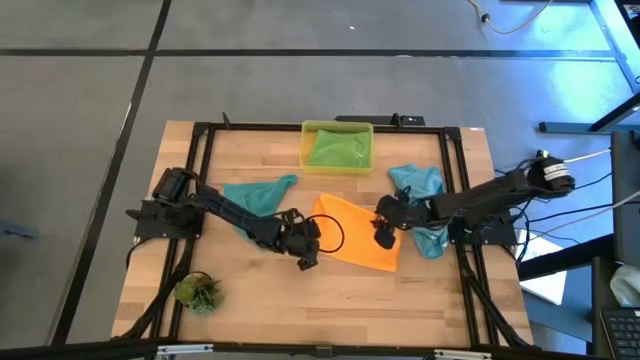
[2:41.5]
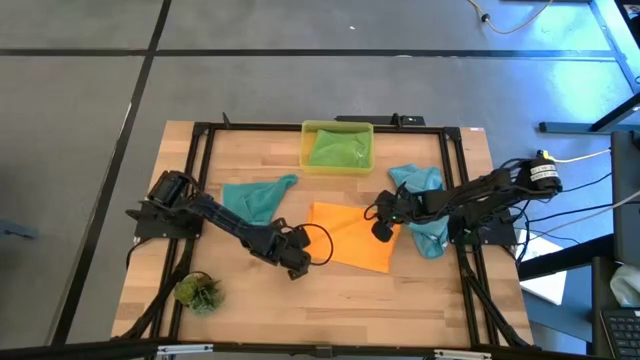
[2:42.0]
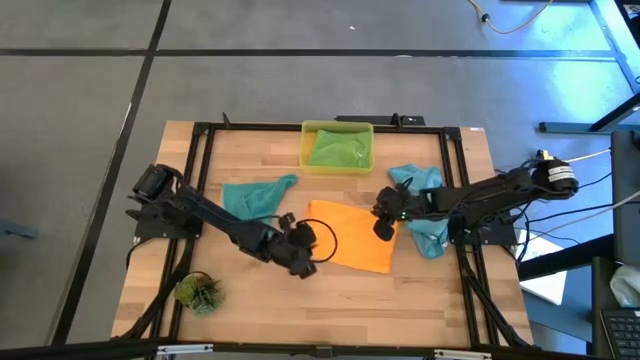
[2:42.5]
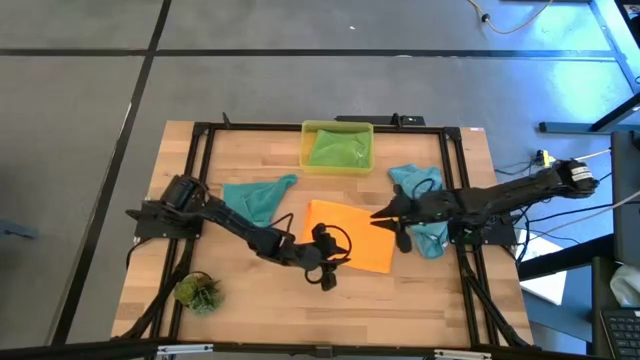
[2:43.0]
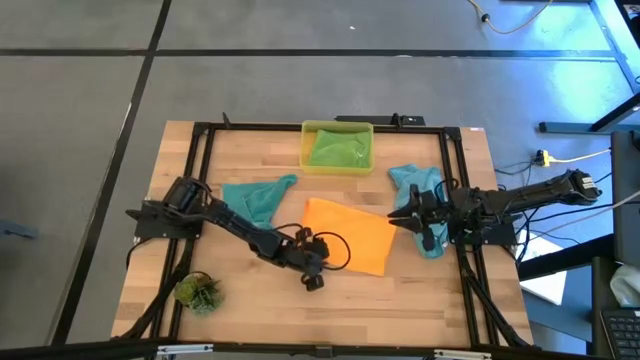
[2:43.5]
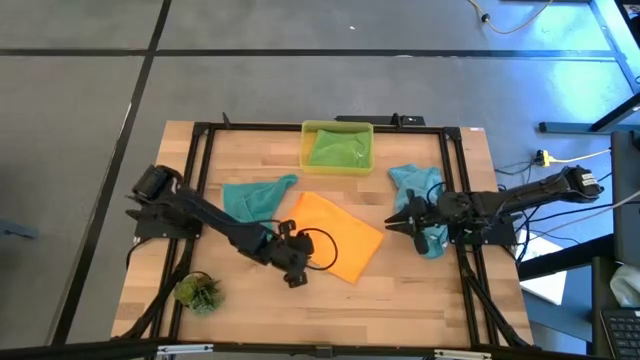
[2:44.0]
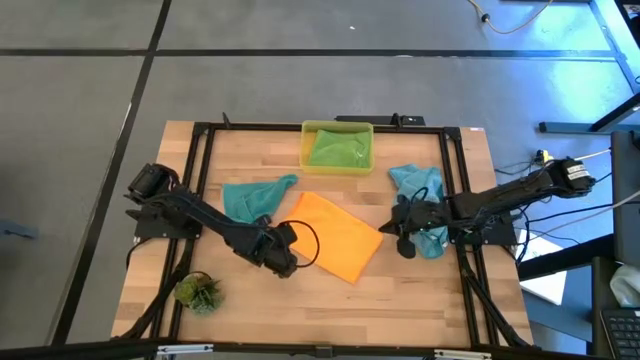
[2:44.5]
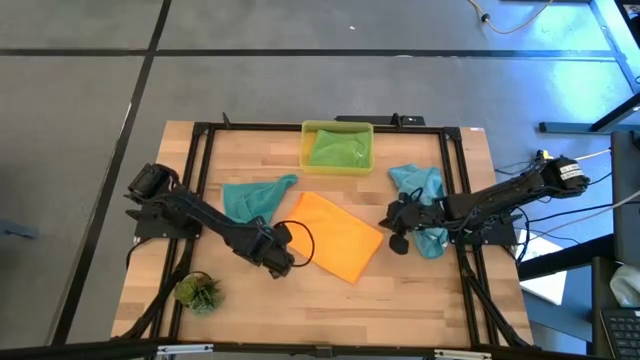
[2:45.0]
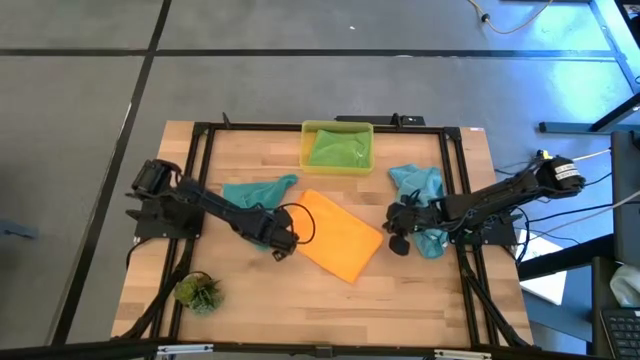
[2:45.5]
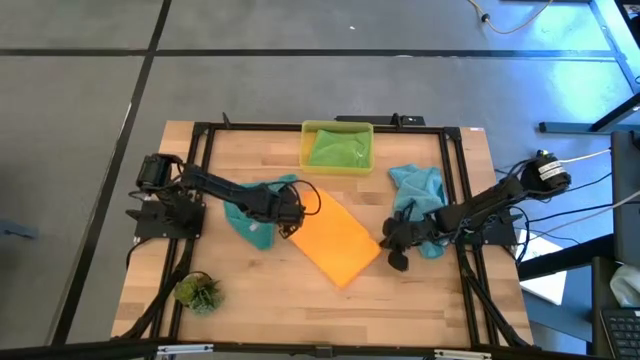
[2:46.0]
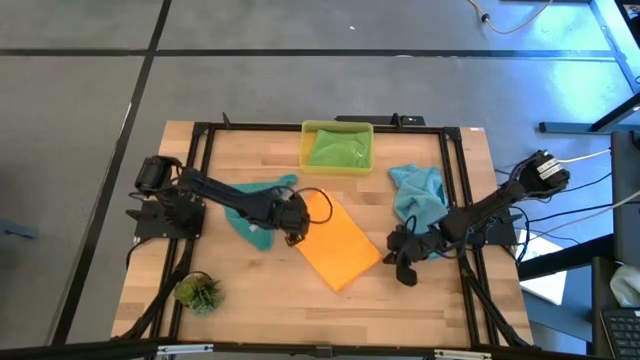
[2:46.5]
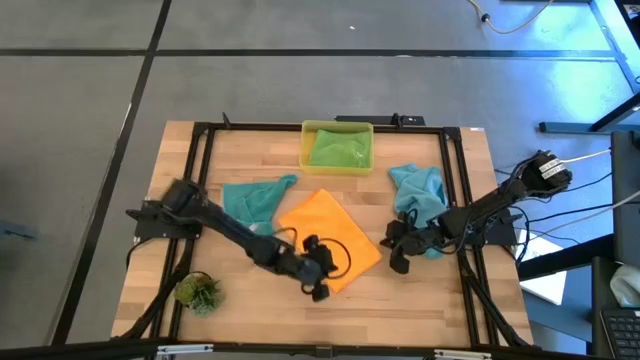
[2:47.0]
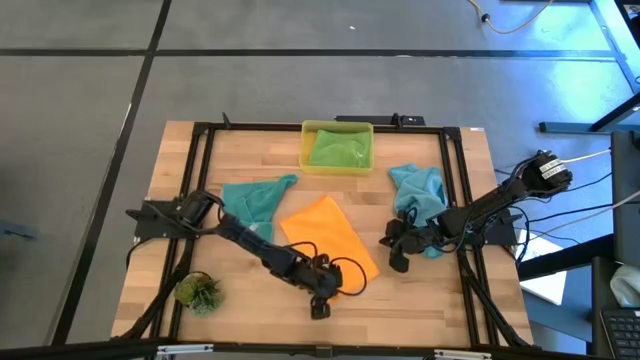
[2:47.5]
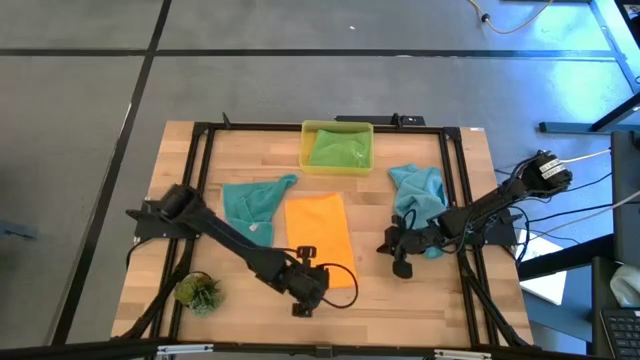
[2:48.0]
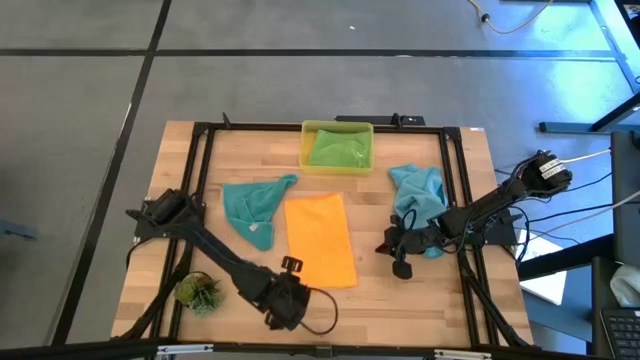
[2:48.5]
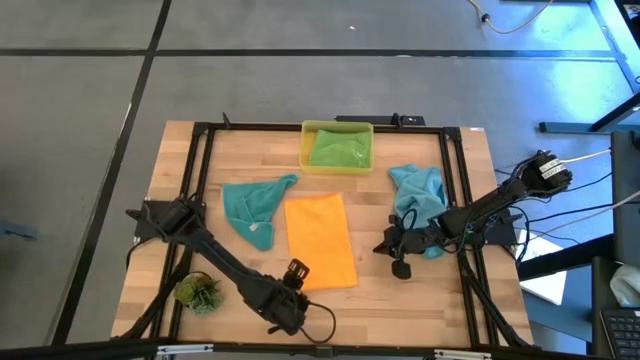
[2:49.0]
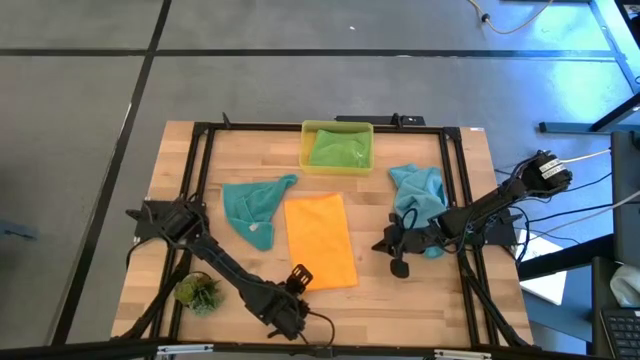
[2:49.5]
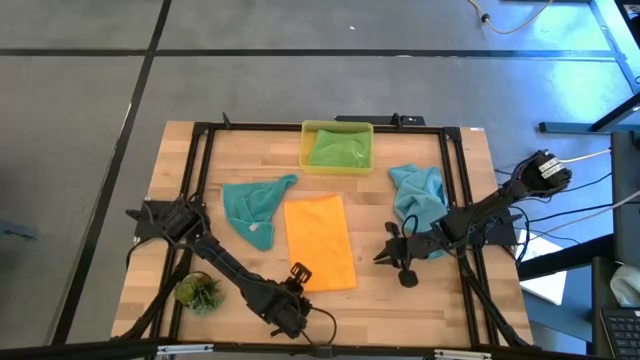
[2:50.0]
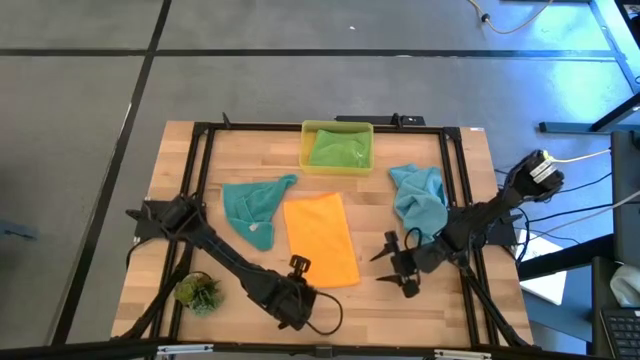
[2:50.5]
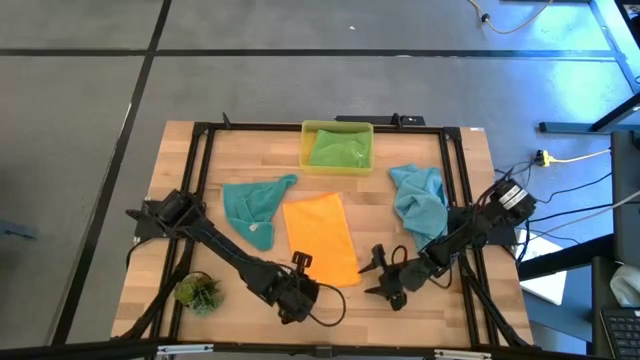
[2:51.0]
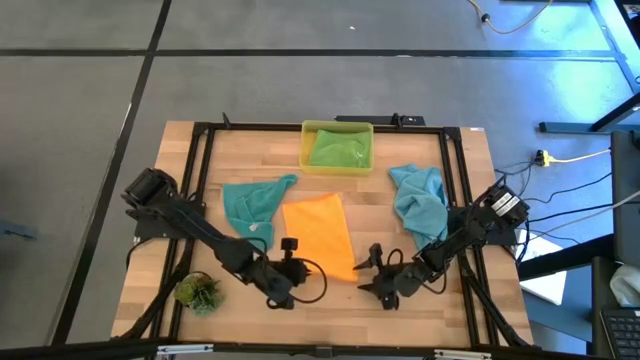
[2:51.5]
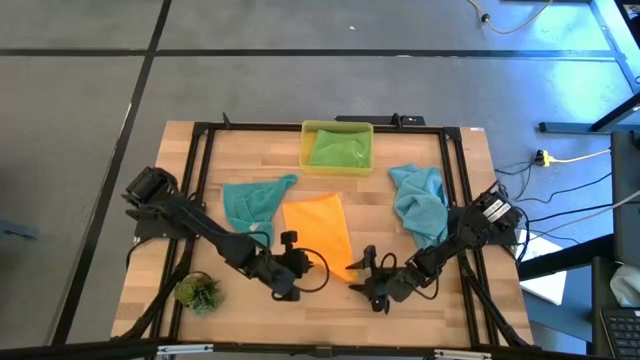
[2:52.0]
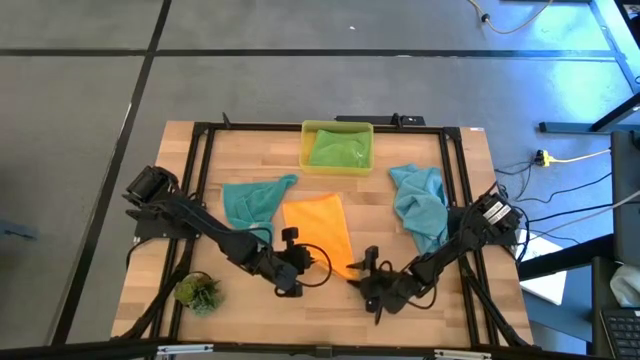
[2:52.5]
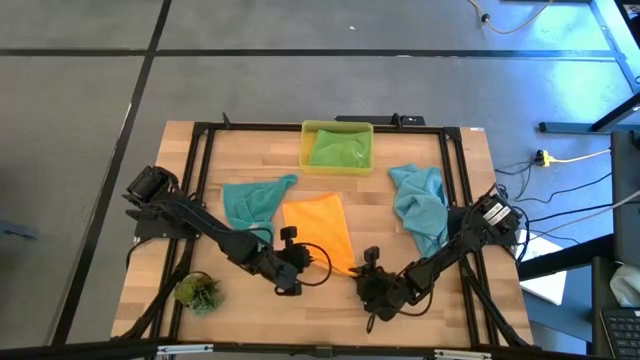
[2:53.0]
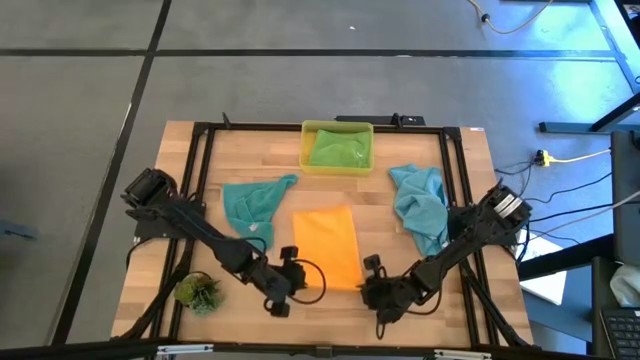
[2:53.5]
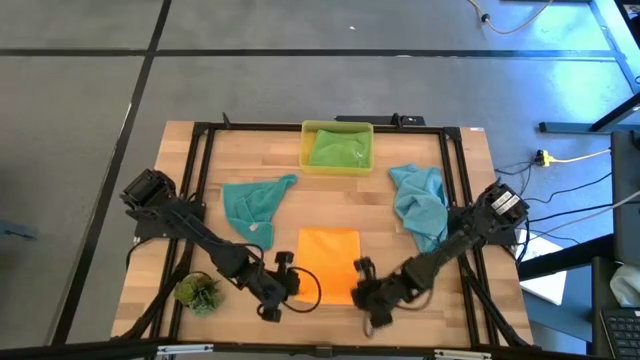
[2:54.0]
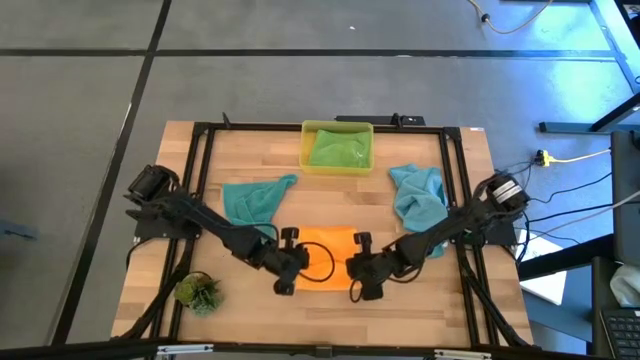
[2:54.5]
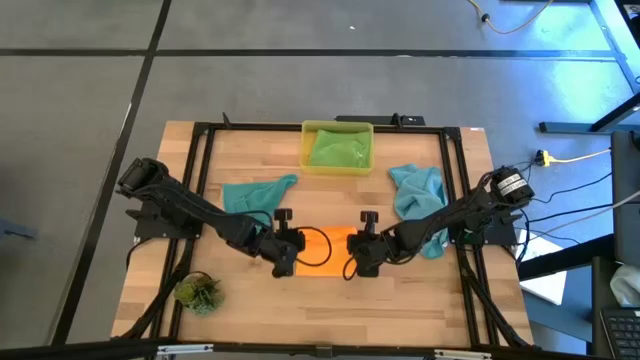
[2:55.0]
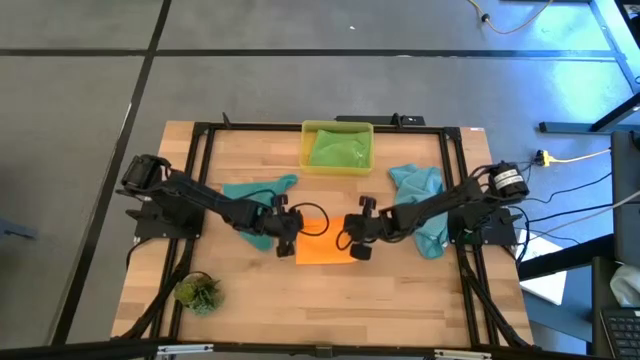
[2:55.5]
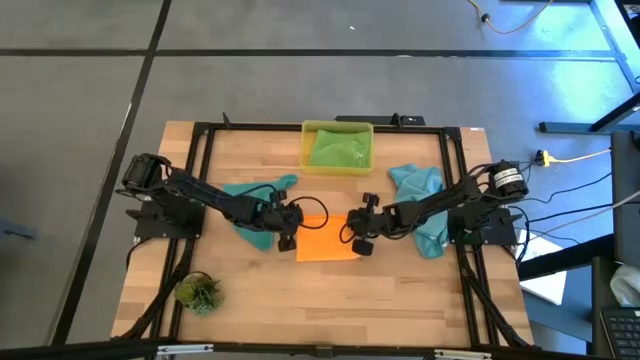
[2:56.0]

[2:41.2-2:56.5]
Task: Fold microfiber towels
Fold the orange microfiber cloth

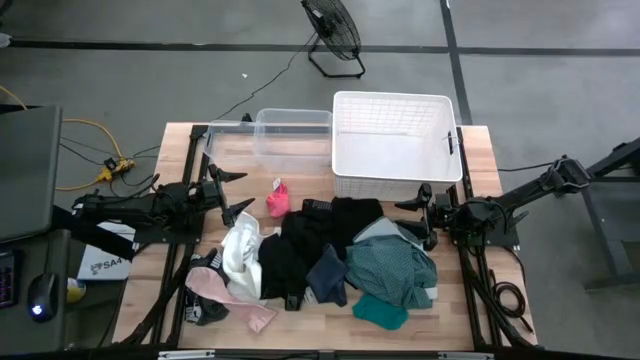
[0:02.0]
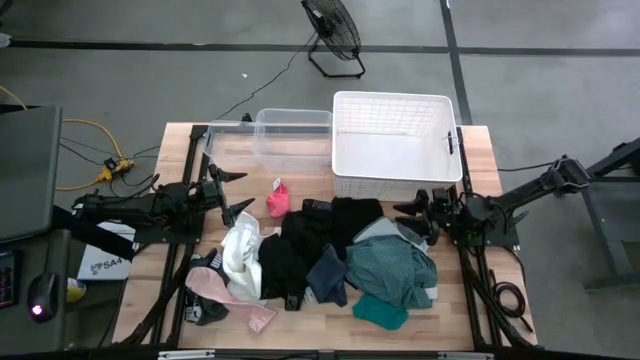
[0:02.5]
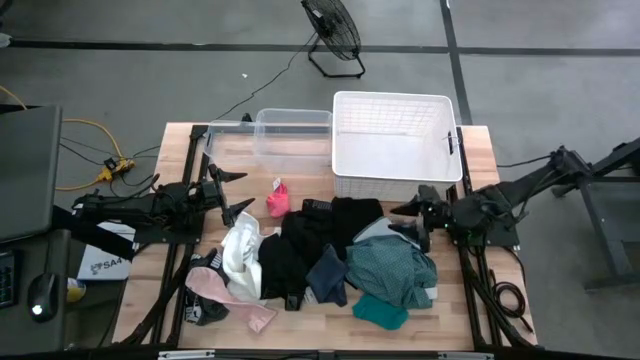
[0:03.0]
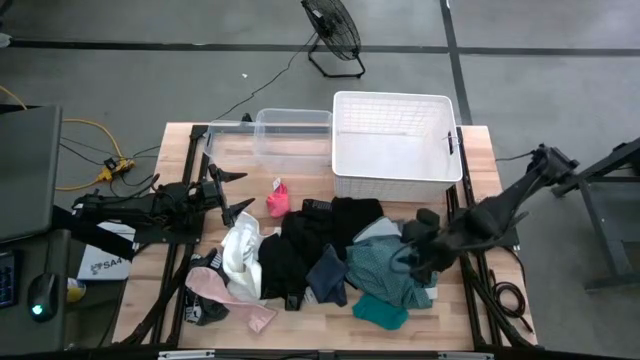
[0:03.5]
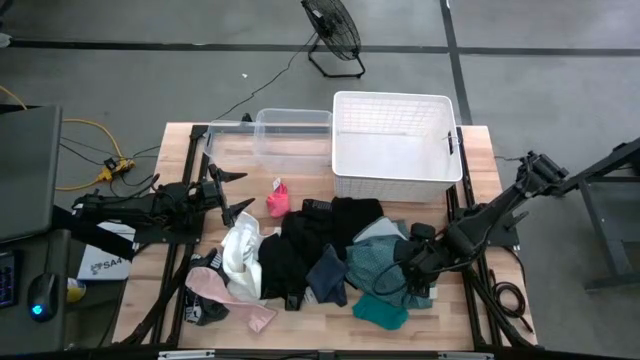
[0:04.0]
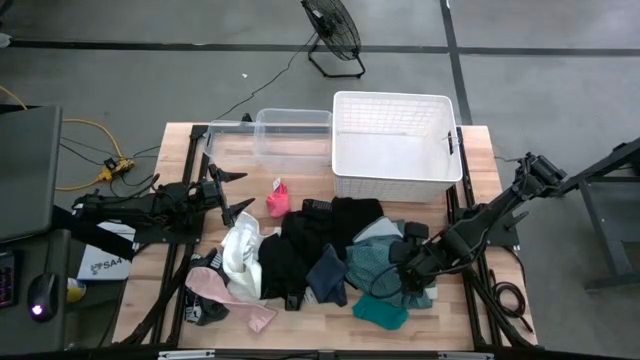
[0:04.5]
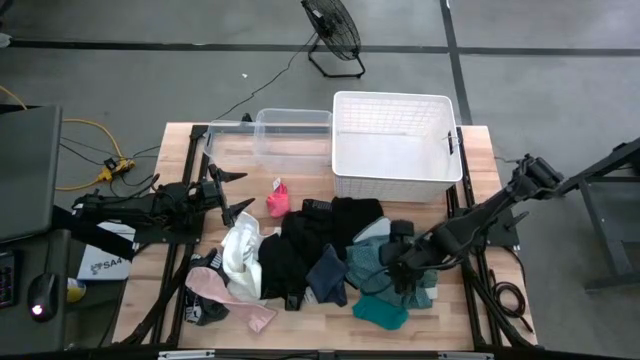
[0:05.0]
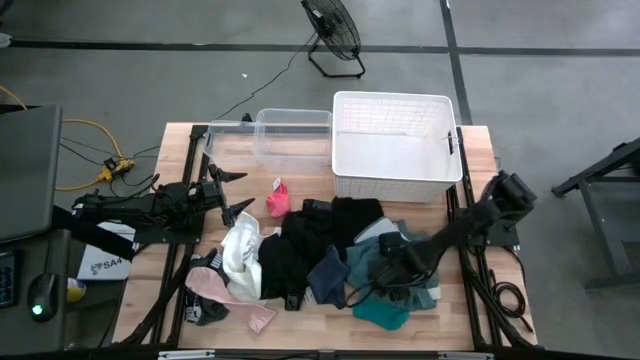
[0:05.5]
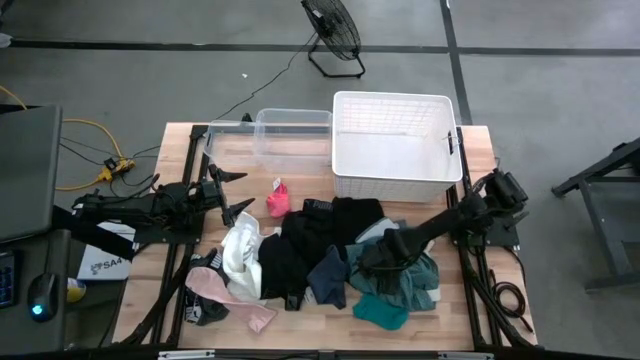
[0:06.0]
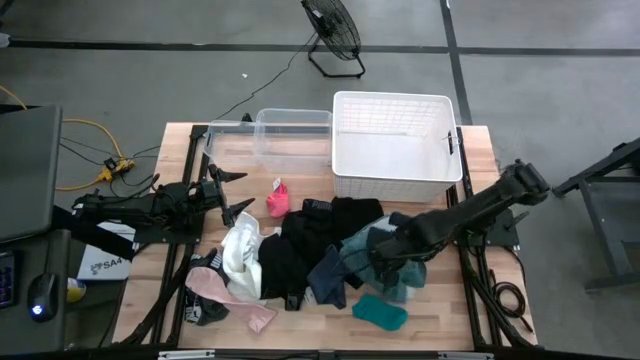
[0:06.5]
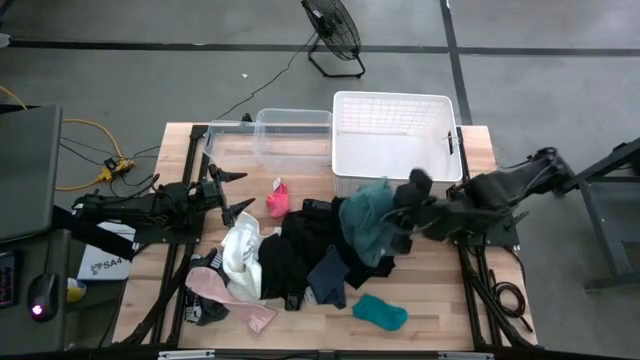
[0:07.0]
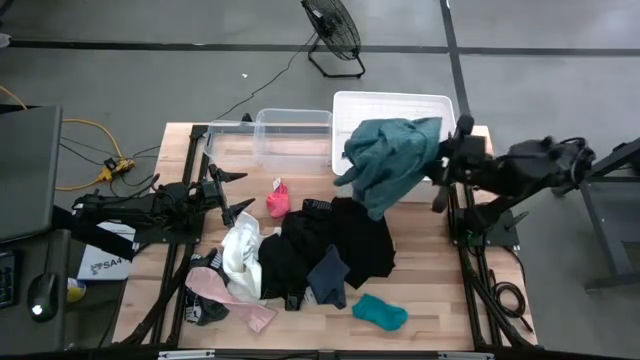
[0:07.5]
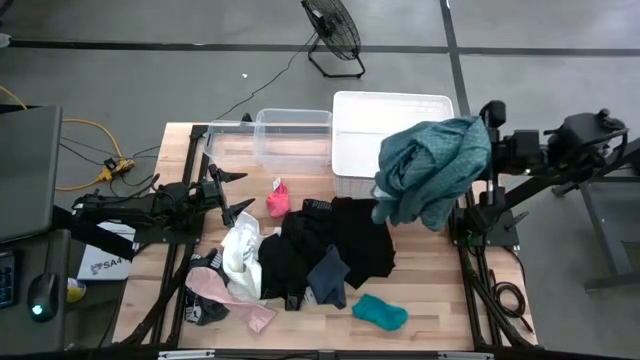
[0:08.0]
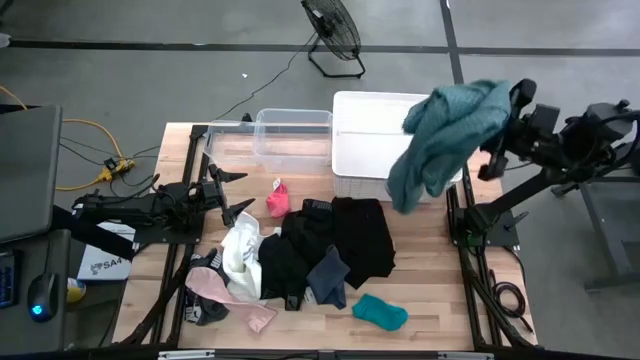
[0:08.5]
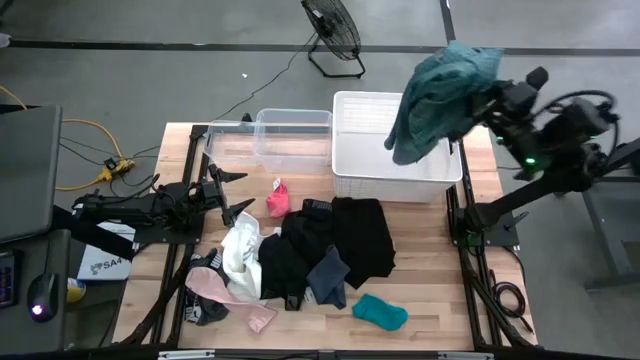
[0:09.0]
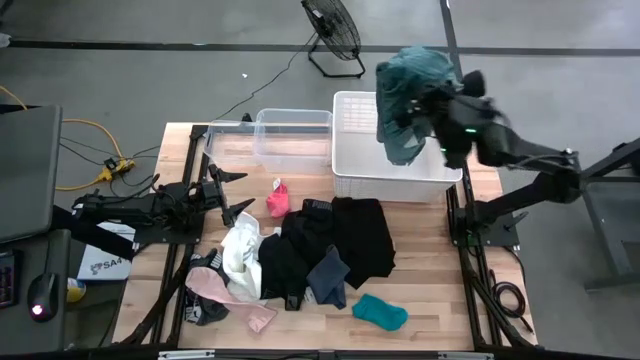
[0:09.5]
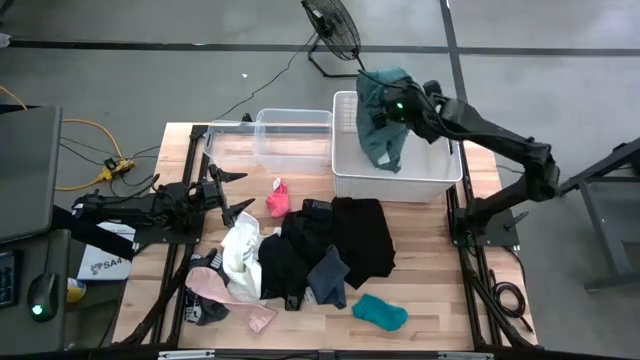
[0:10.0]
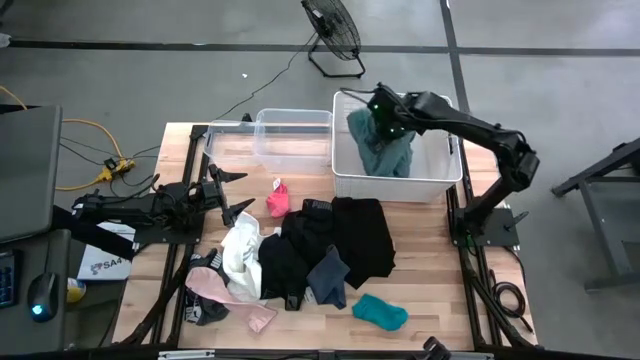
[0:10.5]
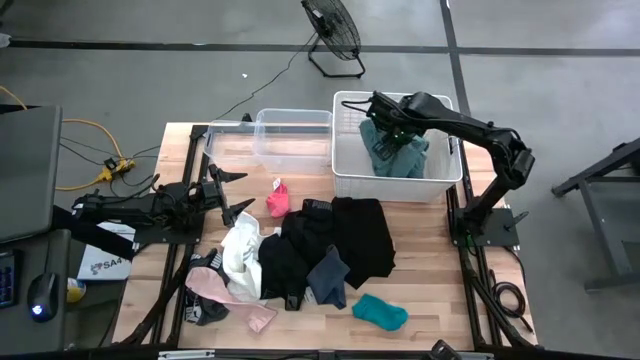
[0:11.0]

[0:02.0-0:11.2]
Task: Pick & Place Cloths
Put the blue polo shirt into the the white laundry organizer
